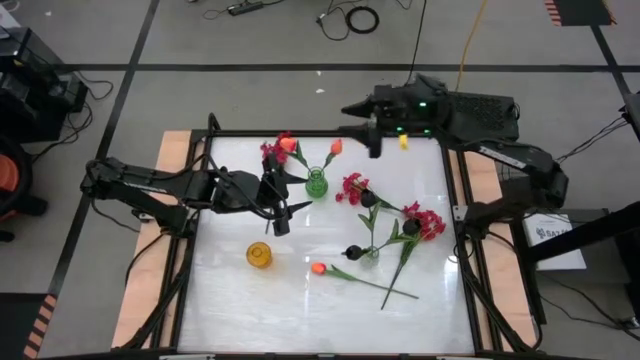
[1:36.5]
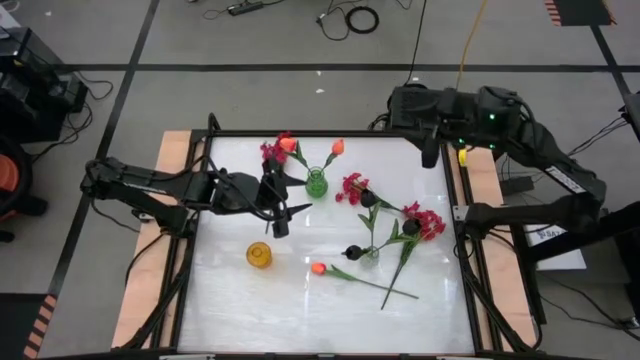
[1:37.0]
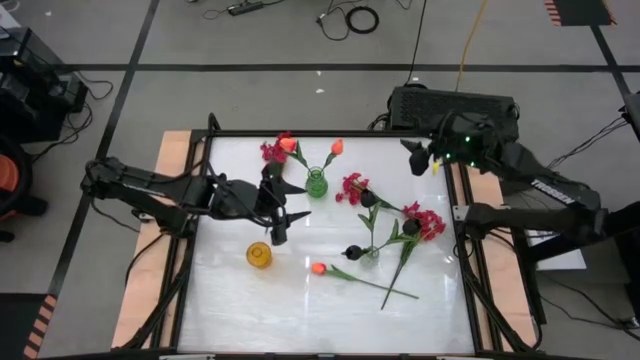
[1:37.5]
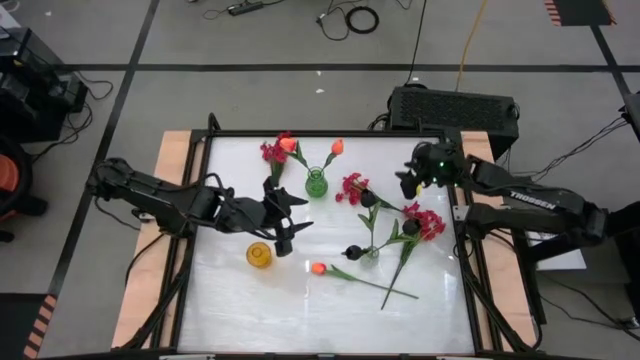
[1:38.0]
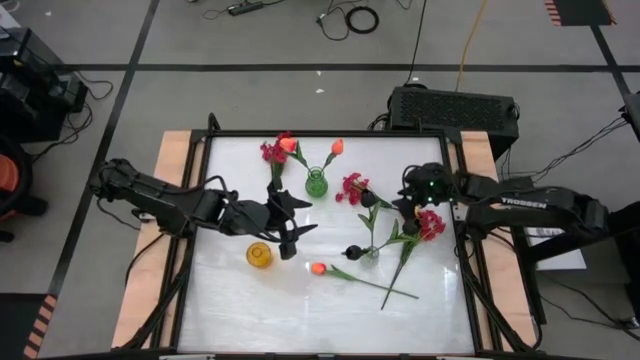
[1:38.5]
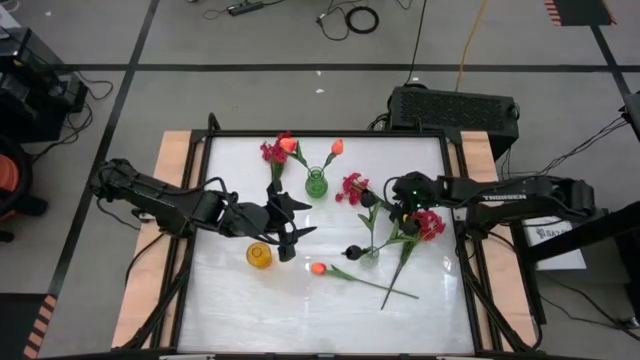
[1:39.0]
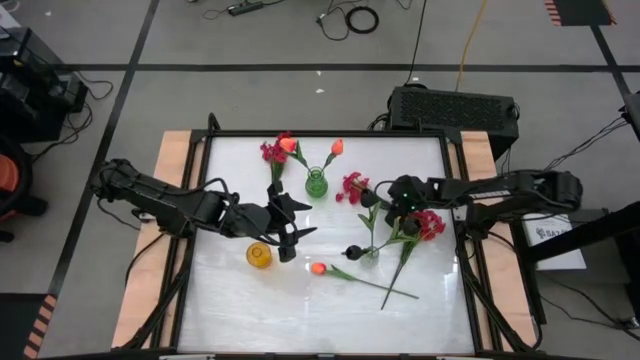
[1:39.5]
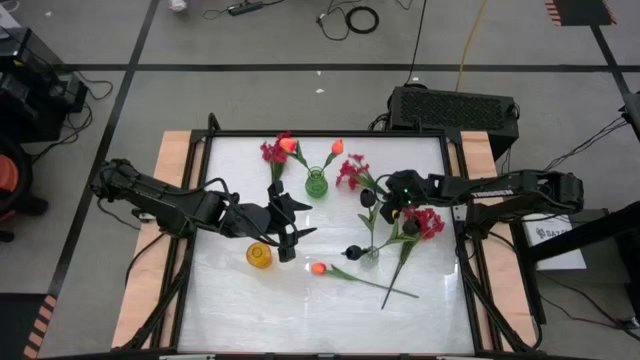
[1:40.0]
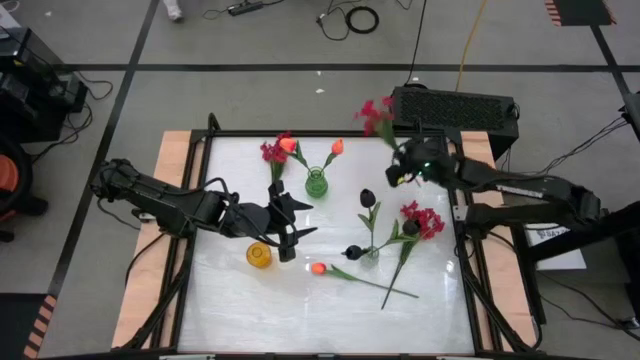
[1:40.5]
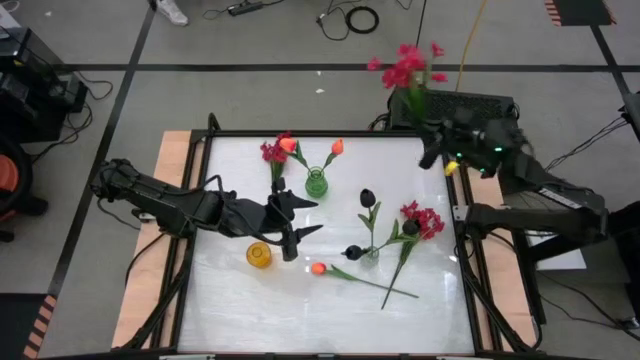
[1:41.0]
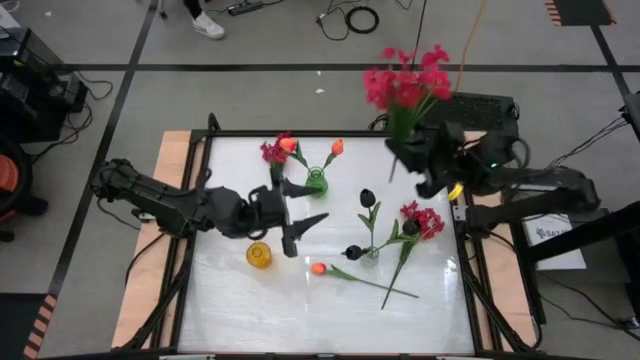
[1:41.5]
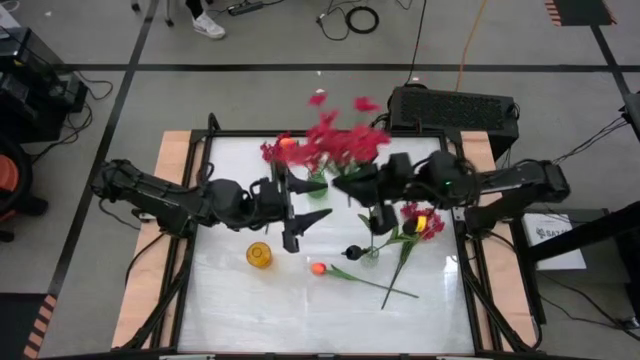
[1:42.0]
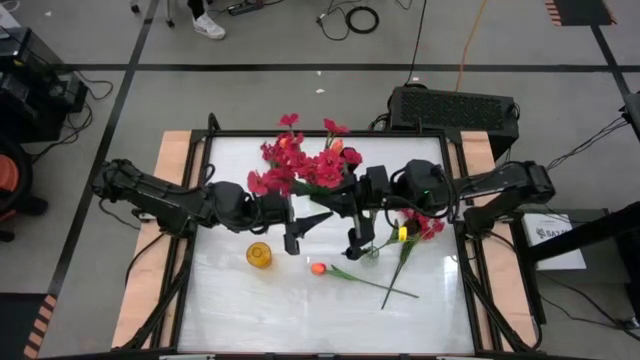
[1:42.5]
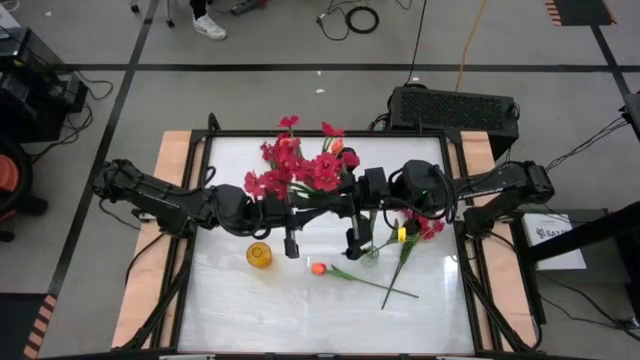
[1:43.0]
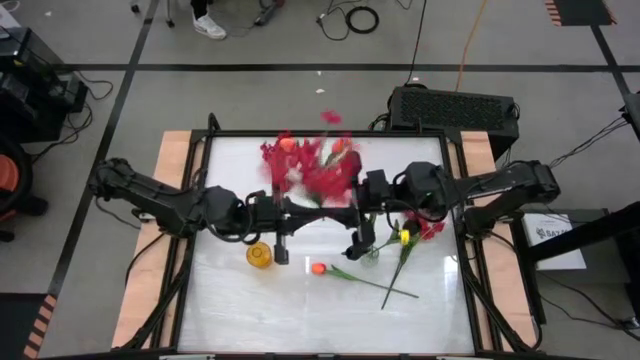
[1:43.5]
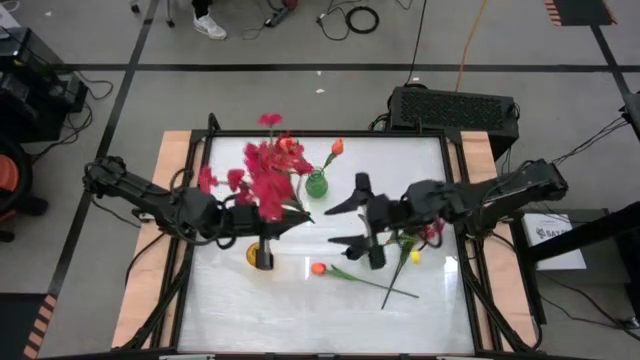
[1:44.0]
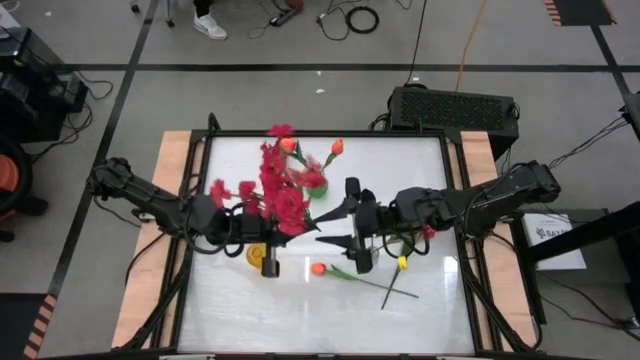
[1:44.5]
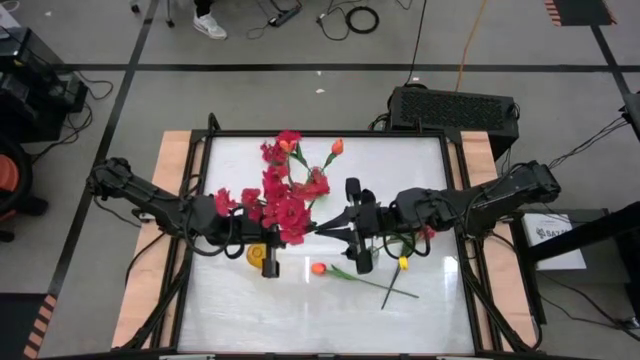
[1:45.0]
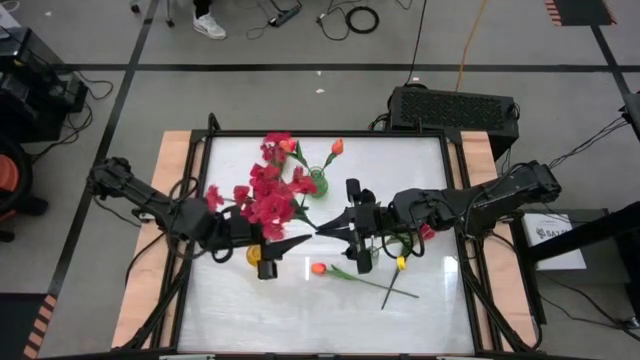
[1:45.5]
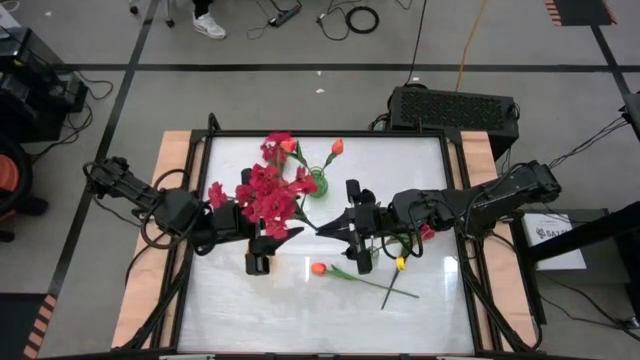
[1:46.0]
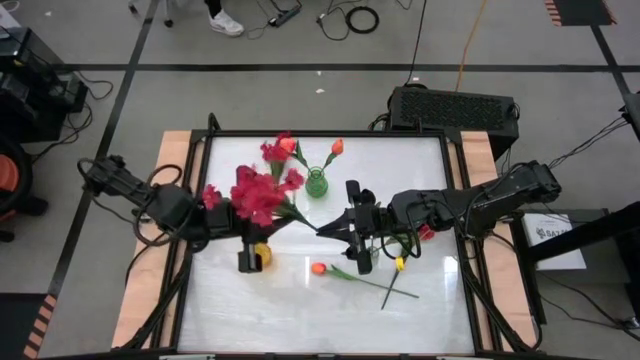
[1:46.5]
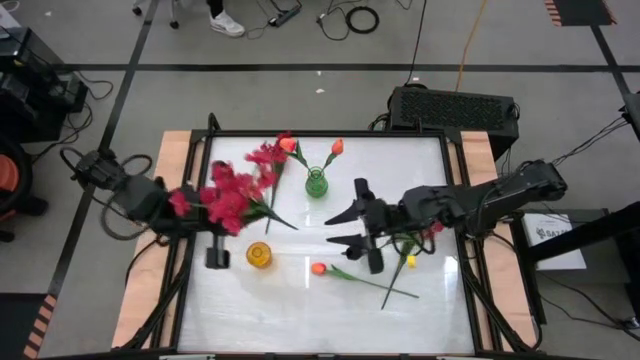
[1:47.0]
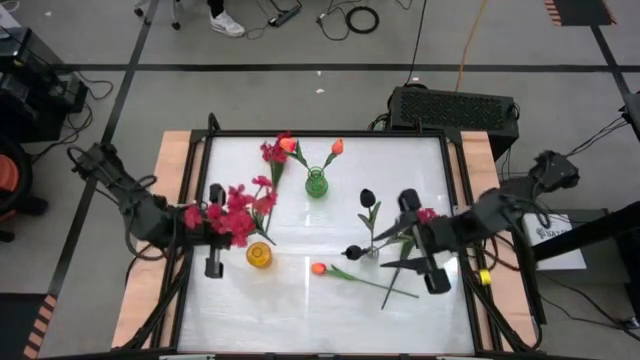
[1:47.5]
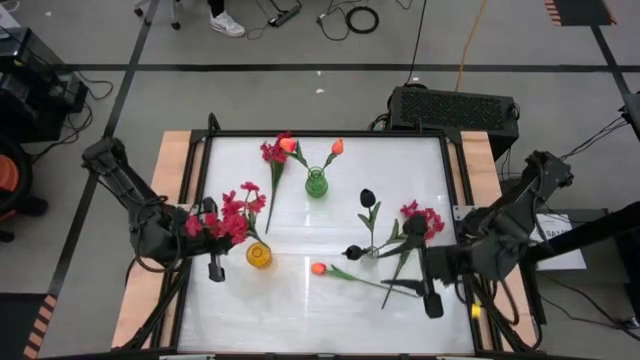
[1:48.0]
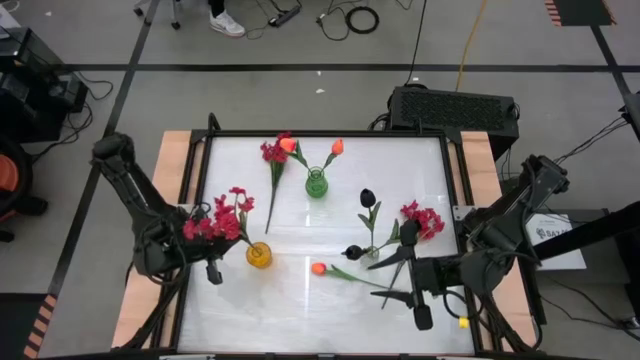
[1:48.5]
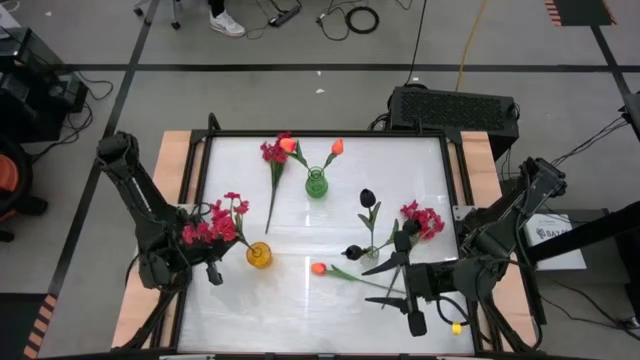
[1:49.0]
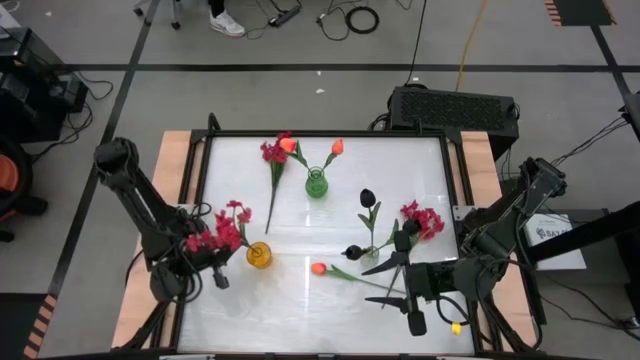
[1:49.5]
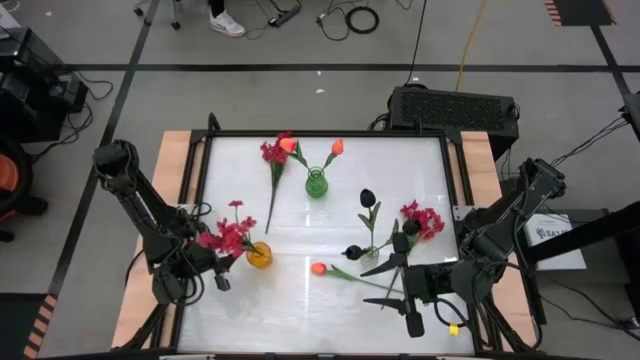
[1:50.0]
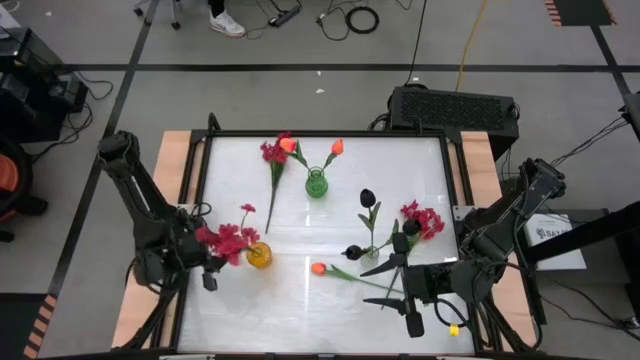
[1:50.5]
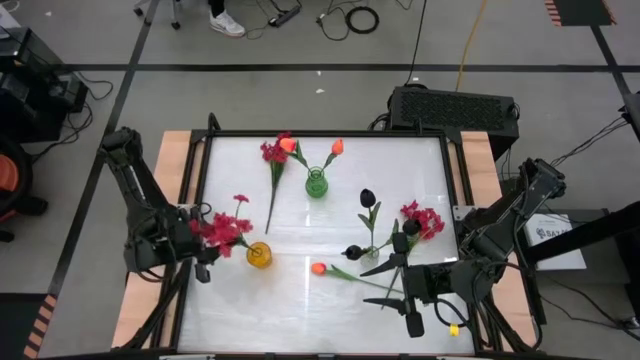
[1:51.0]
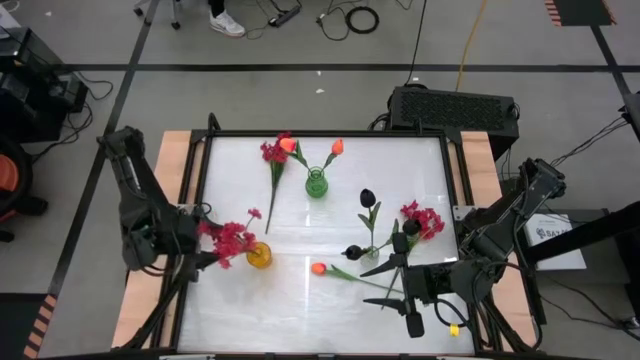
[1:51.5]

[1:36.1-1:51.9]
Task: Sort flowers into vase by color
Put the middle red flowers into the yellow vase

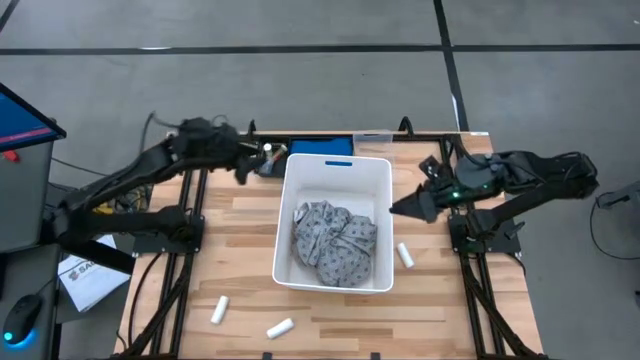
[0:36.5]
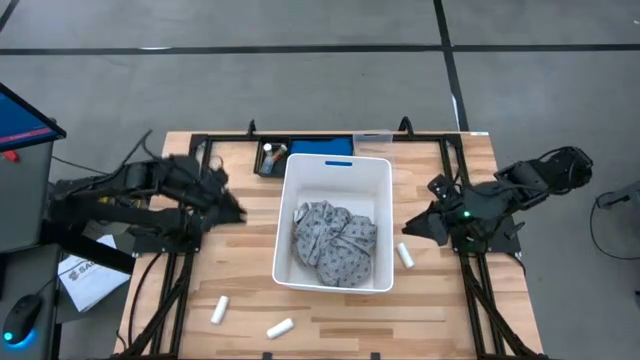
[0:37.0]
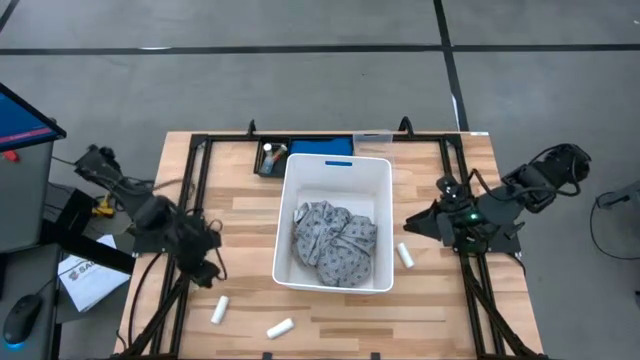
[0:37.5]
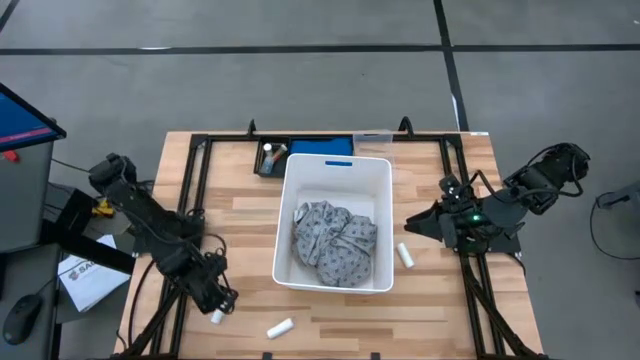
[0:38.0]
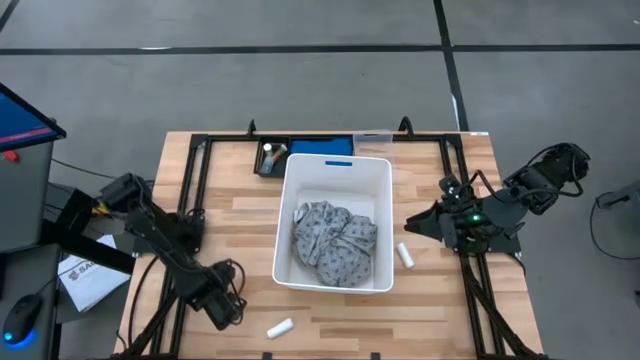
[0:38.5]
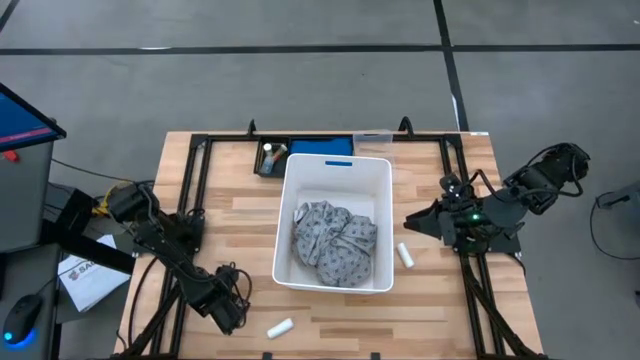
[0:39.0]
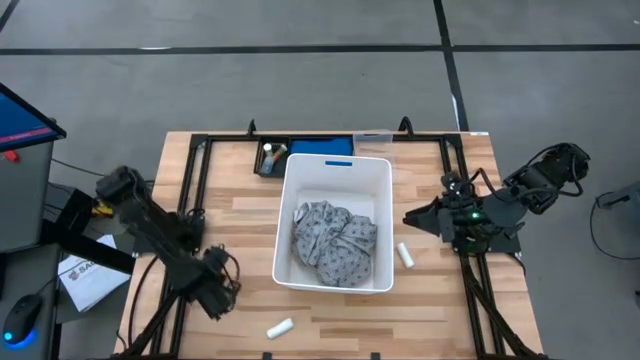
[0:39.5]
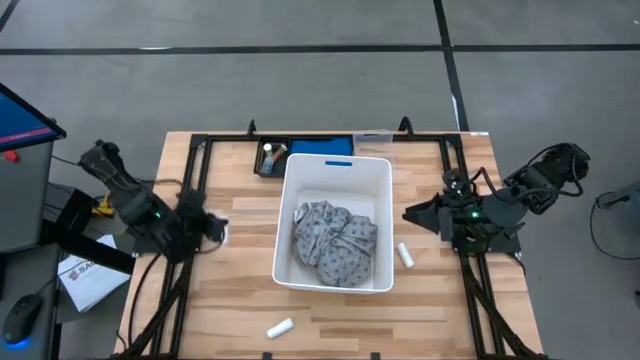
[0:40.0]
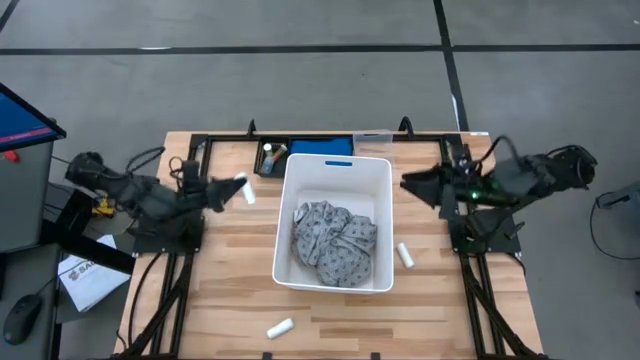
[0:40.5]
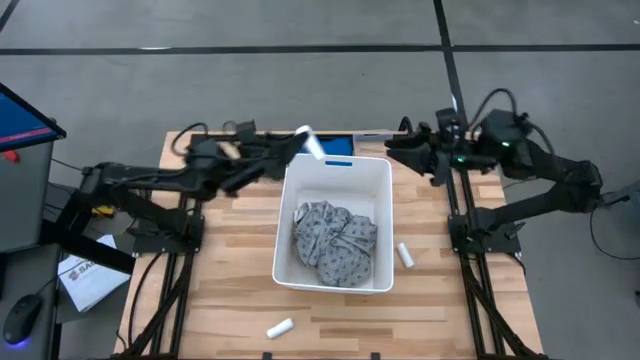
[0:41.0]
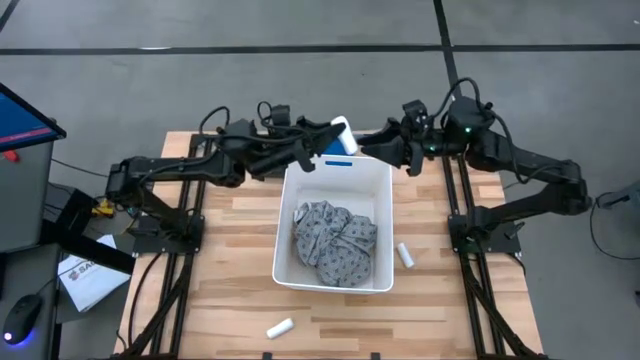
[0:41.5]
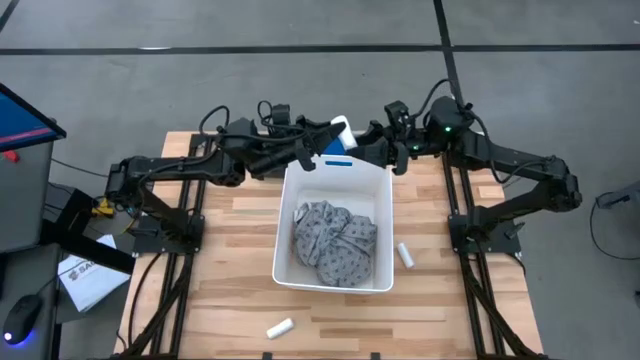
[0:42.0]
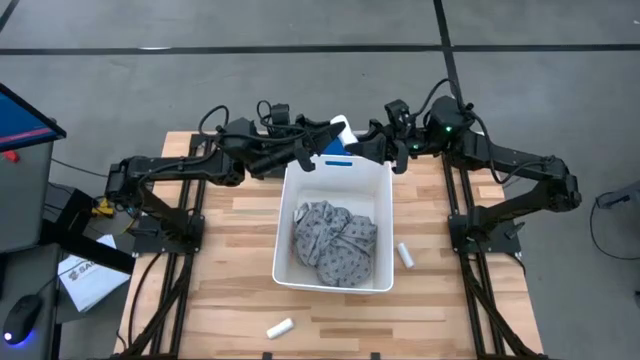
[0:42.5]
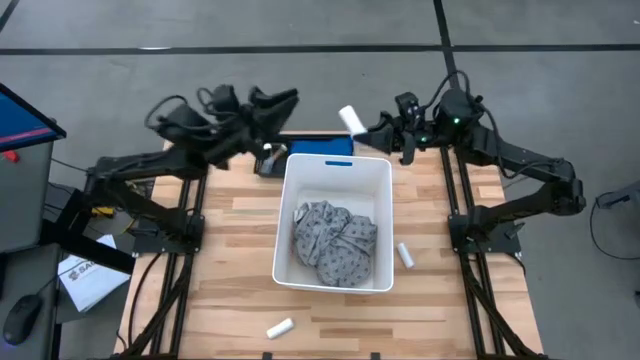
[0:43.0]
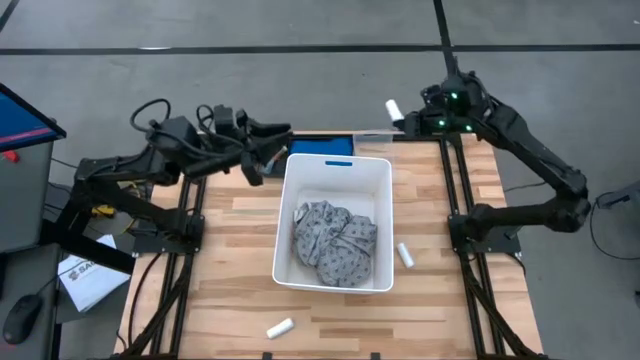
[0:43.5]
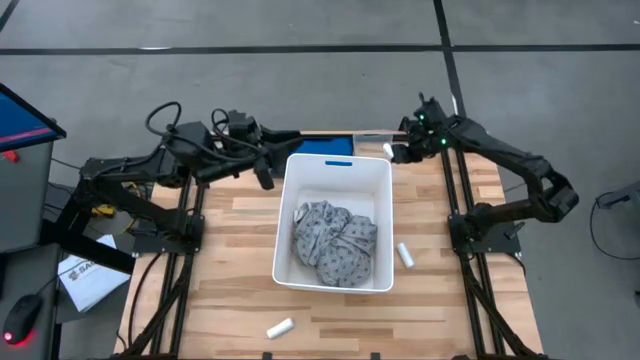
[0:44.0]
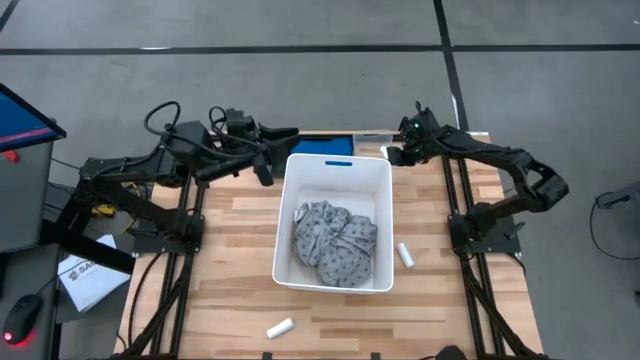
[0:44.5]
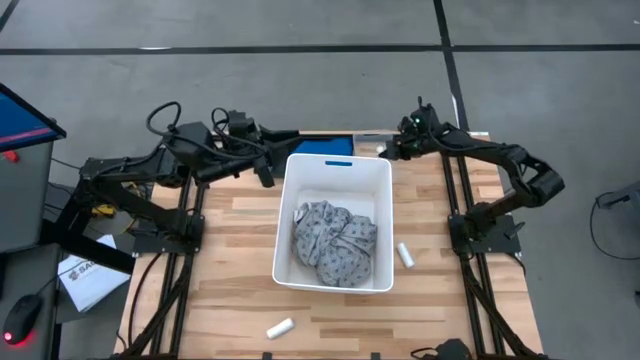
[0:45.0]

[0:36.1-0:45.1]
Task: Pick & place medical supplies in basket/bin
Put the bottom left white bandage into the transparent bin
